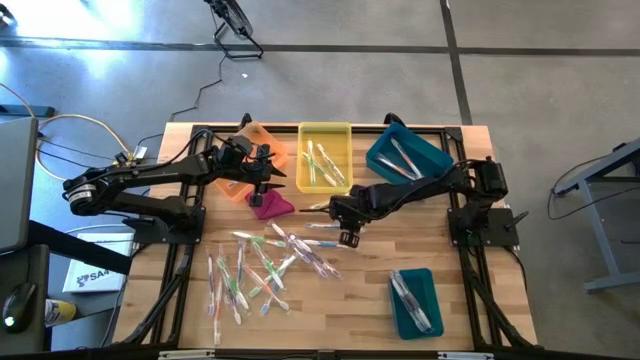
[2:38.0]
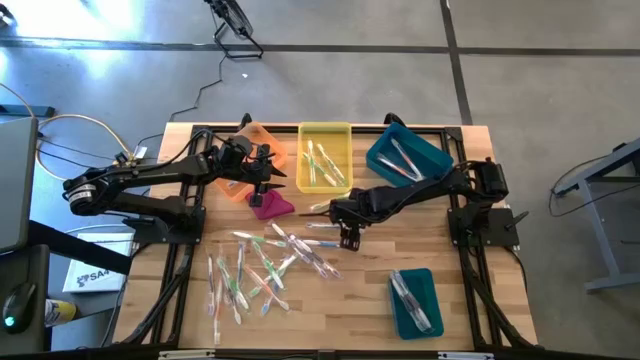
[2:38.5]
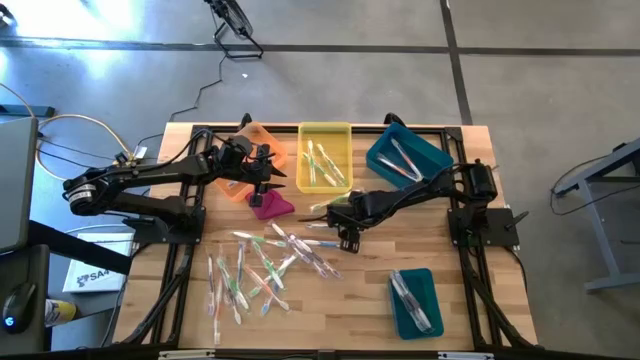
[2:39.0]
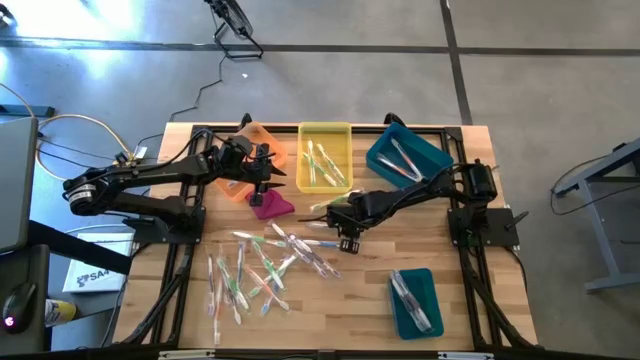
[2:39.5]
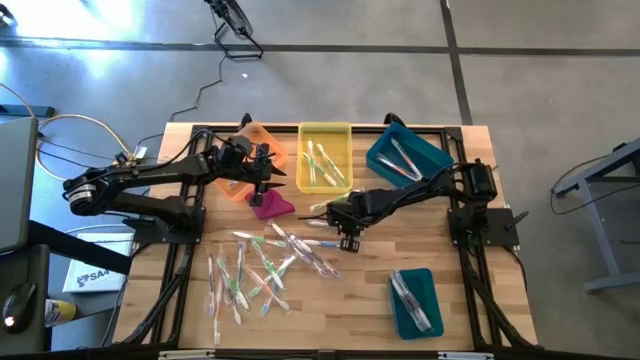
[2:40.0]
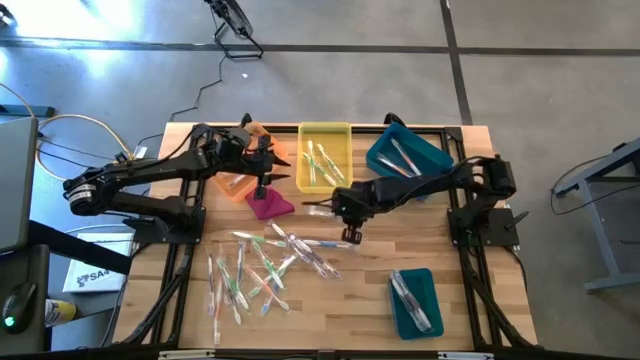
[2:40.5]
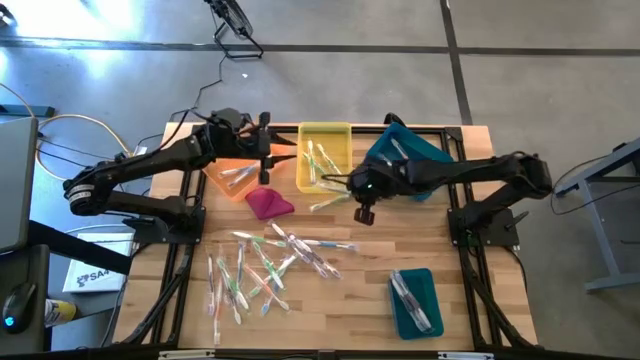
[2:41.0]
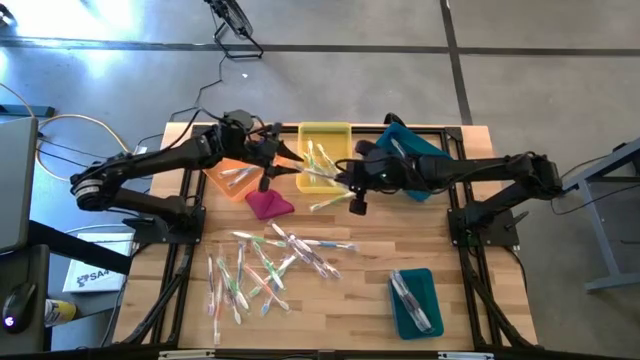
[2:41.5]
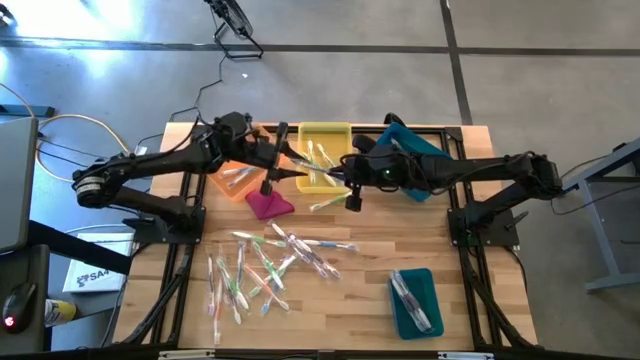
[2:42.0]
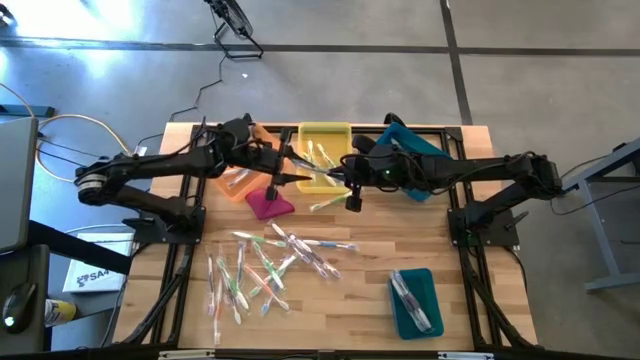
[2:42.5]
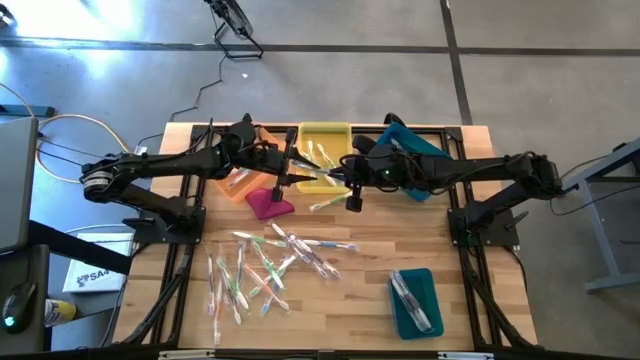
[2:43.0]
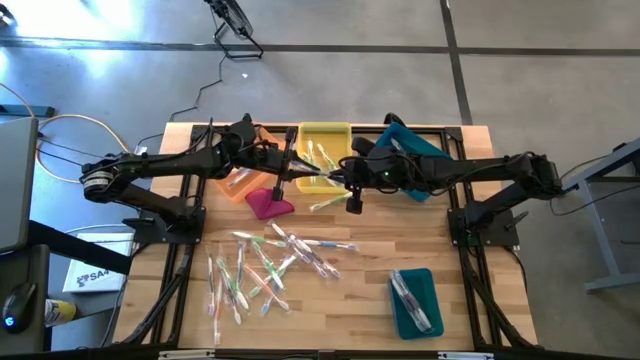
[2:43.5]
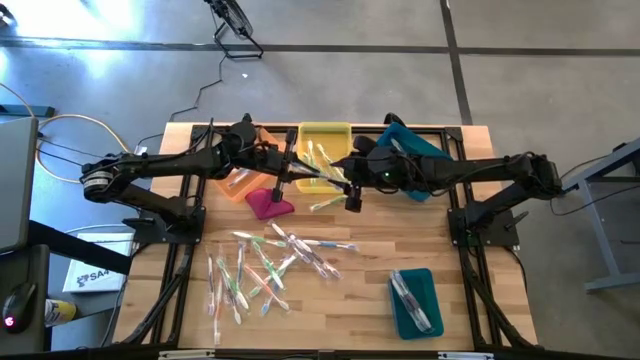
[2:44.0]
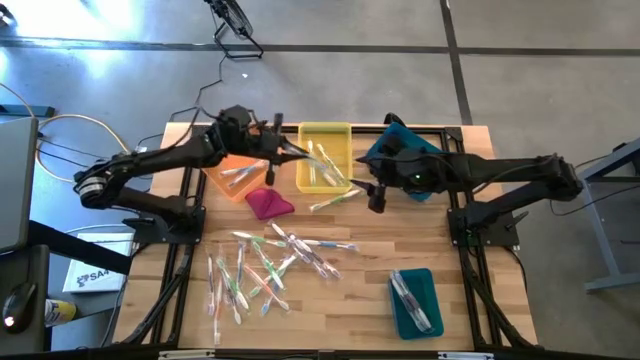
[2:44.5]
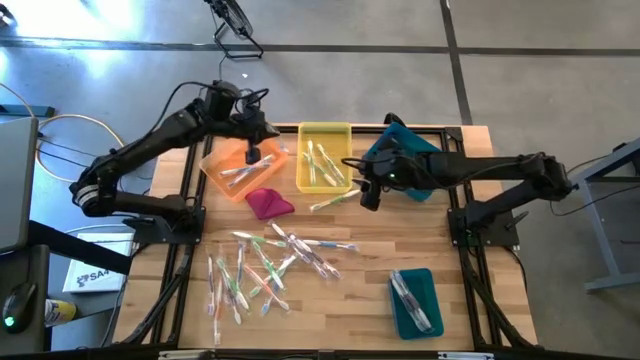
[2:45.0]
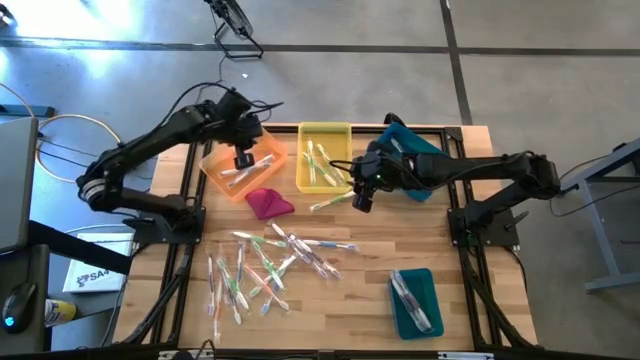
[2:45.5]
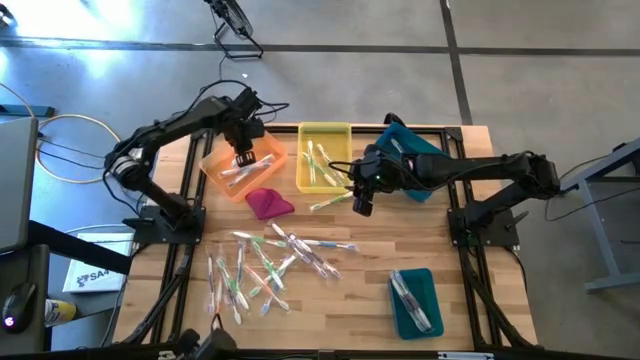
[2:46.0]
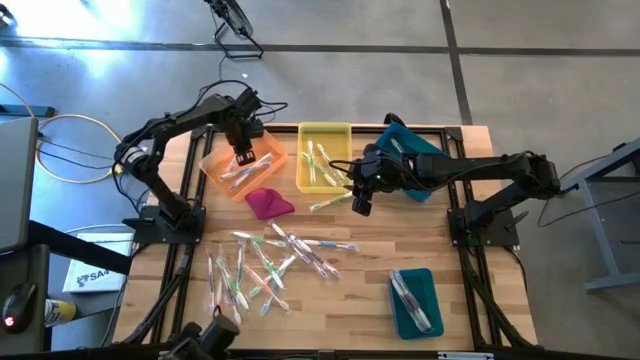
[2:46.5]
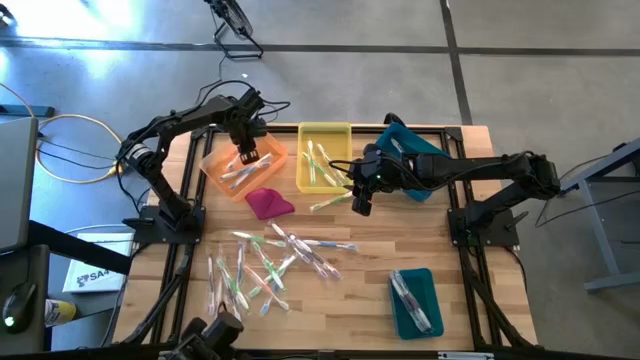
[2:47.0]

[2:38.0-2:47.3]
Task: Pick & Place Toothbrushes
Put the blue toothbrush into the orange bin

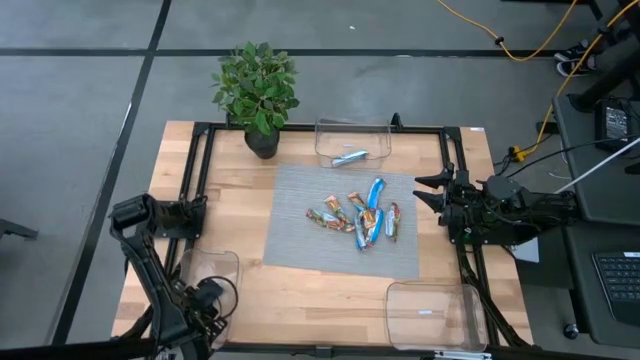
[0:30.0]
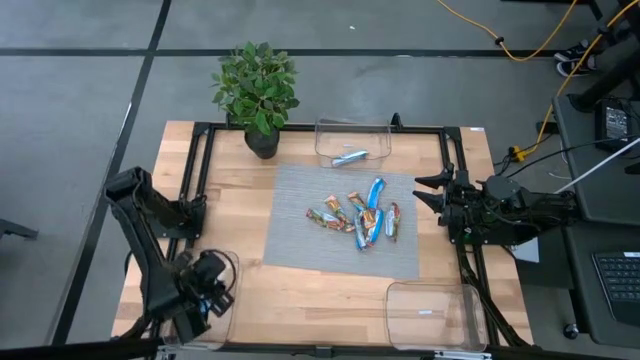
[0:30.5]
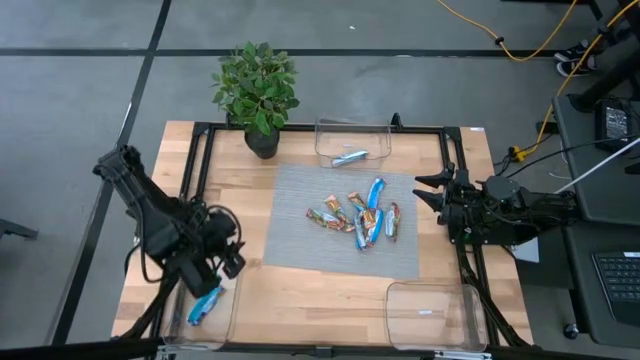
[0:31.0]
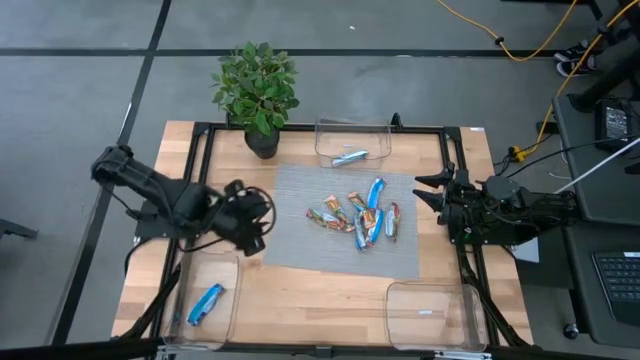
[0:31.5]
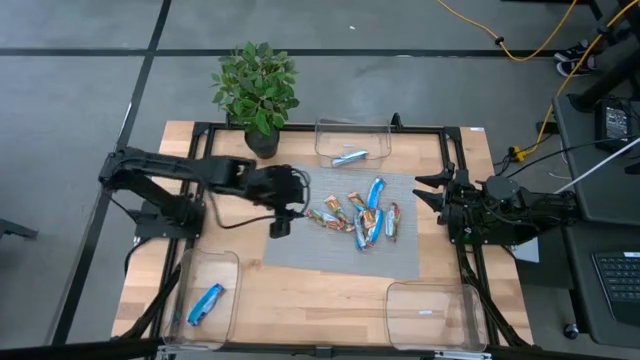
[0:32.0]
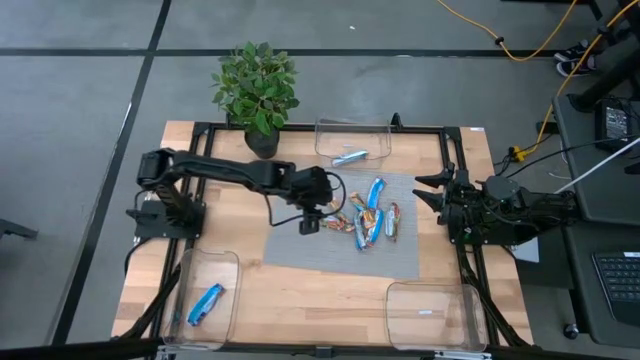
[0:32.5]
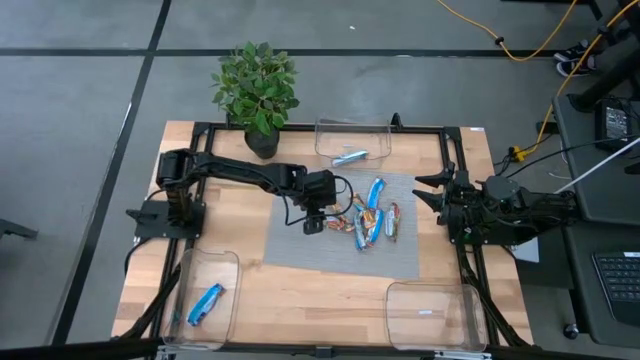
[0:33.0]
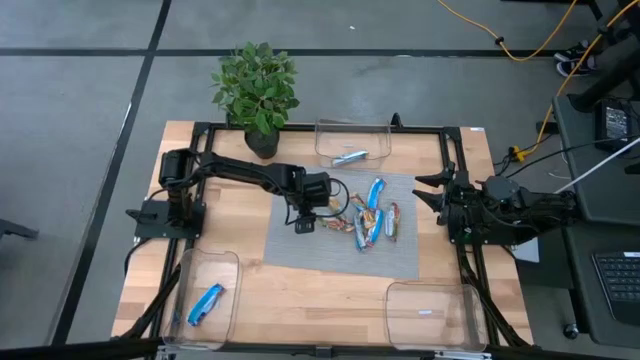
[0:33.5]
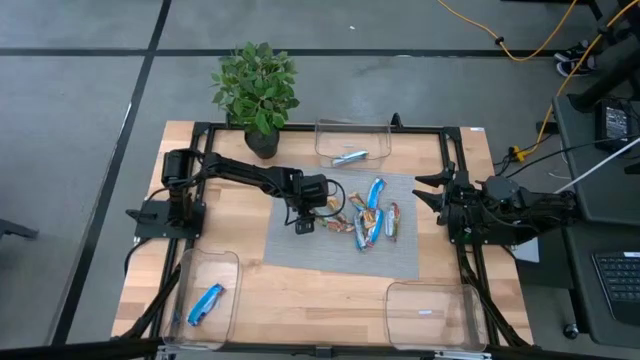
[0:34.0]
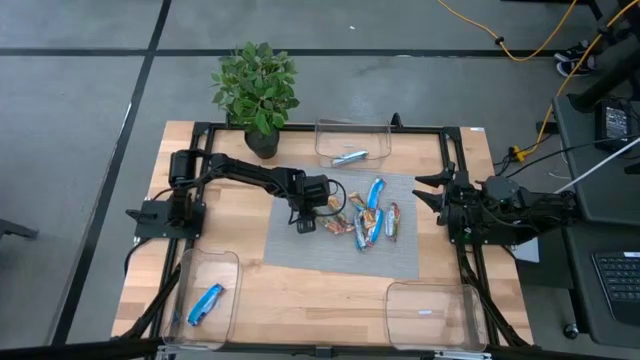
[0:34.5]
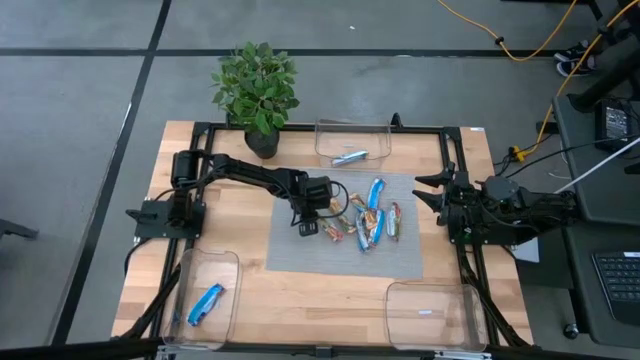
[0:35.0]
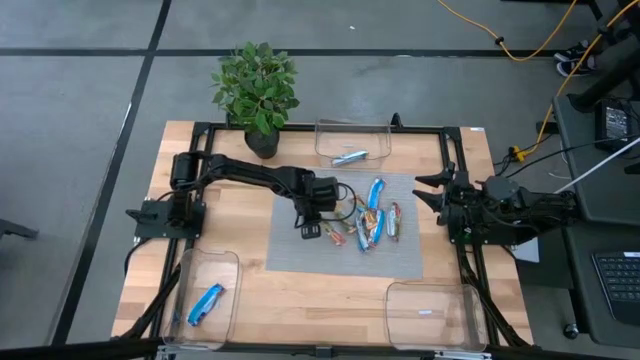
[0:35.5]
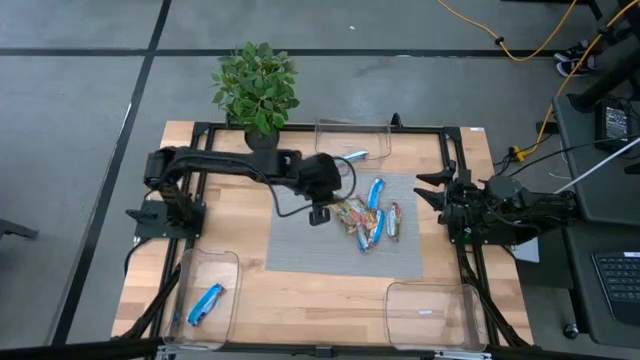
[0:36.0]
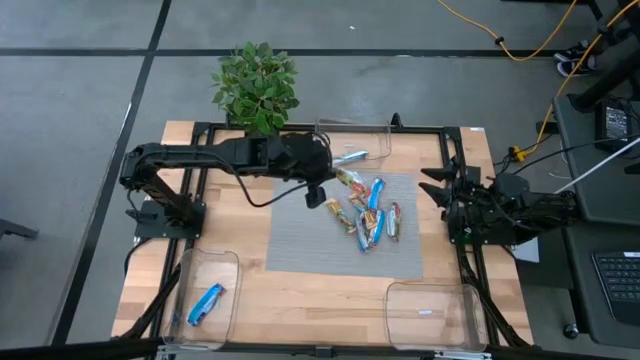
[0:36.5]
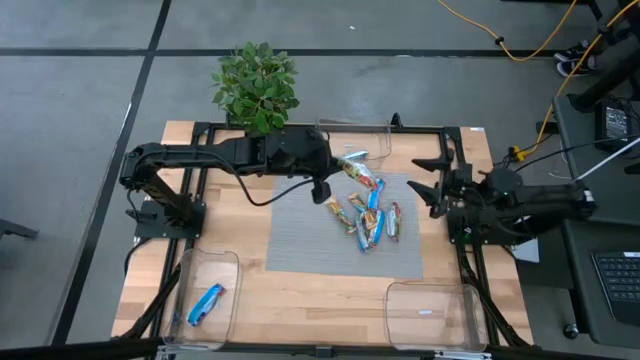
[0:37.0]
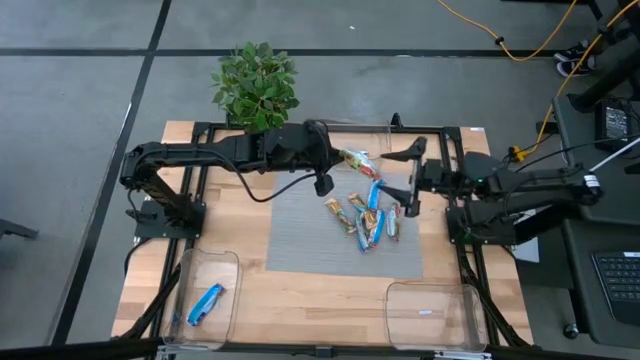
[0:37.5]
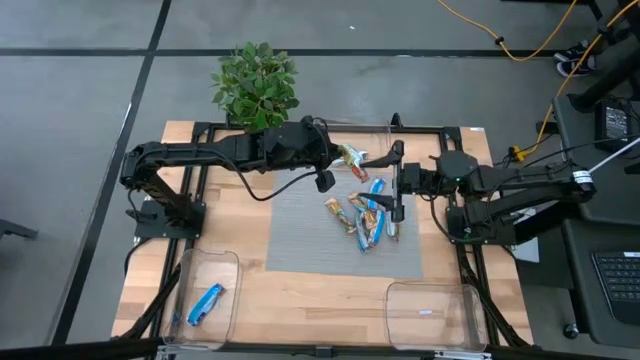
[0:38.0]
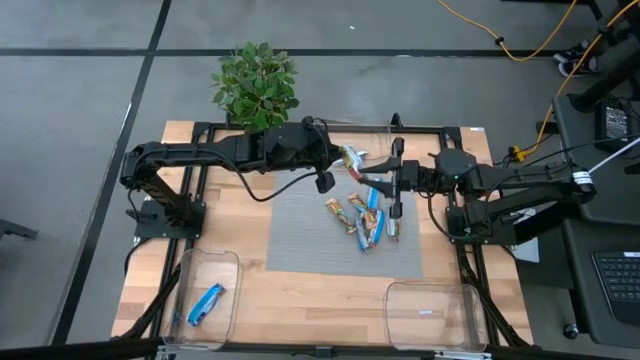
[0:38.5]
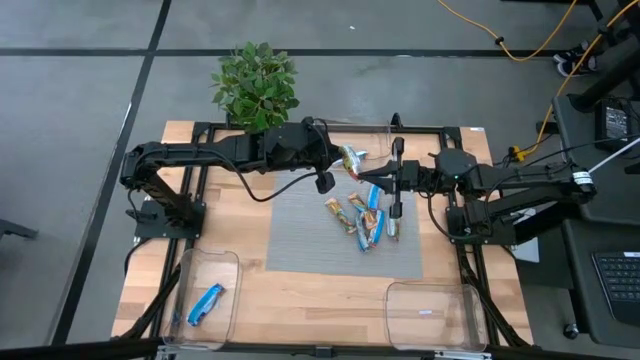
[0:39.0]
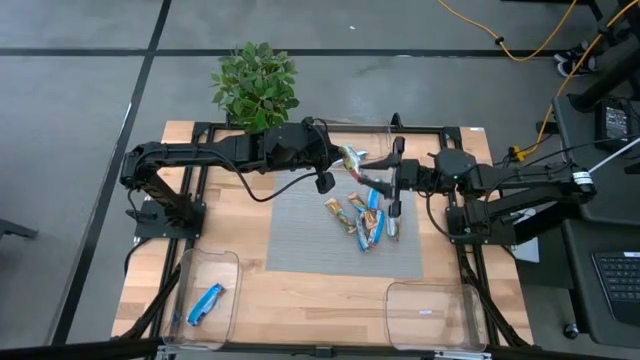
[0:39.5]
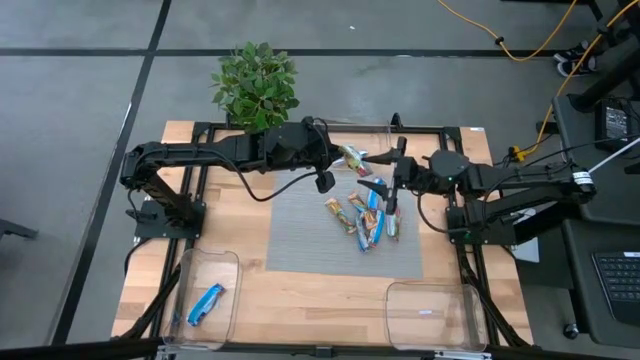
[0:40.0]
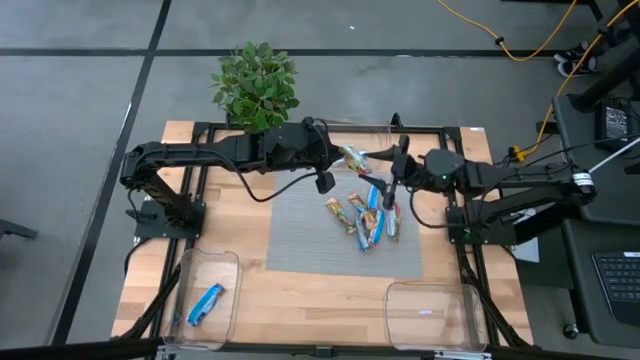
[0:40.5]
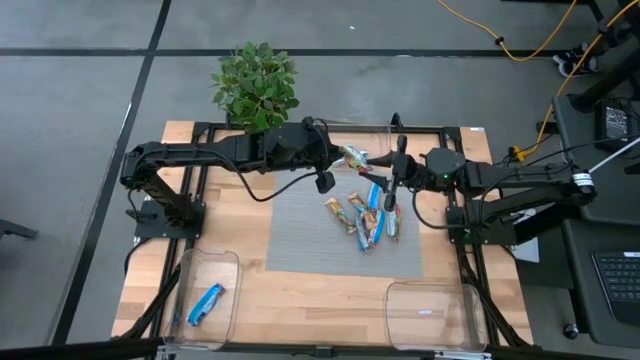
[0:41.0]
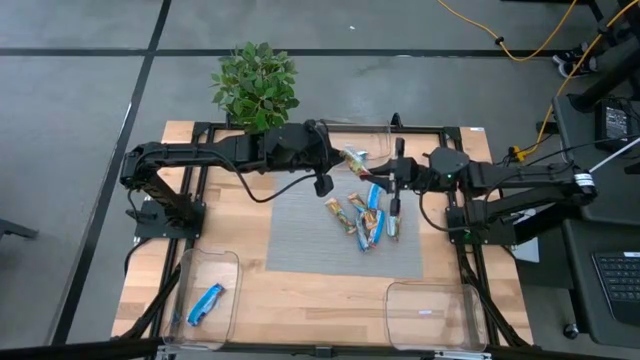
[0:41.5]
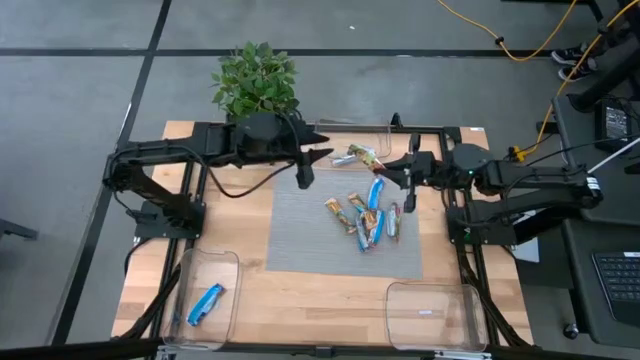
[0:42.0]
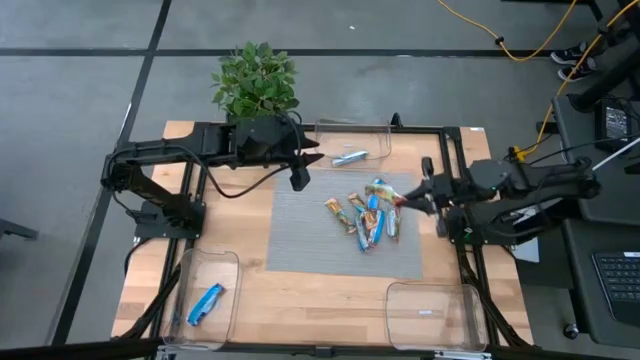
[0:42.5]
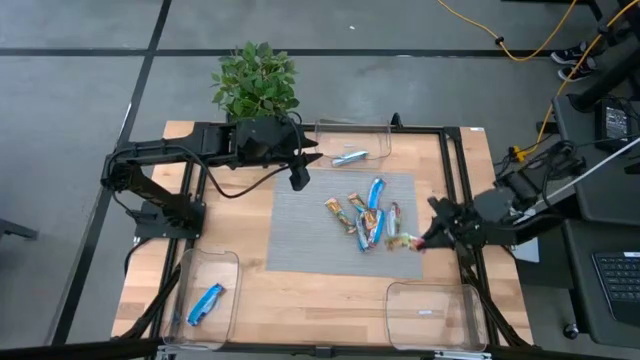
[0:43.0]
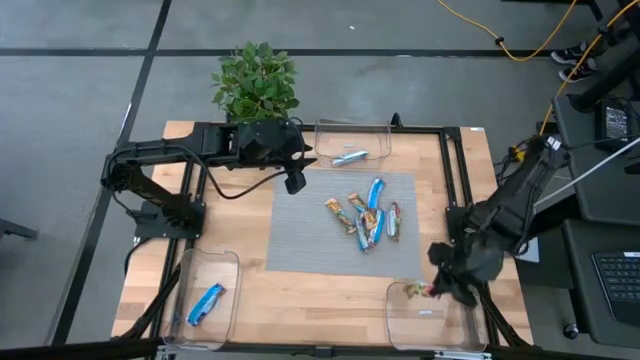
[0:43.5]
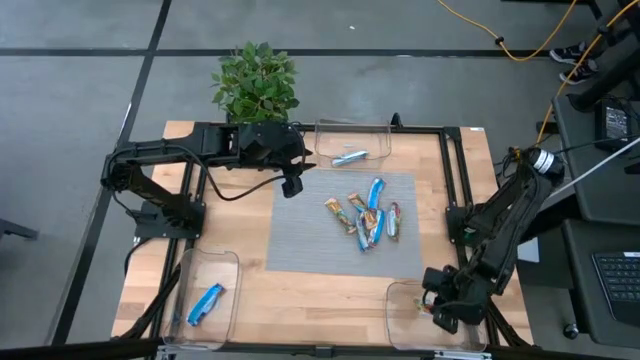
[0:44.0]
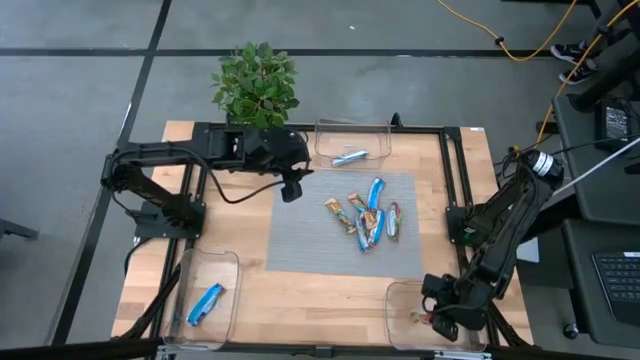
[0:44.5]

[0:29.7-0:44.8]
Task: Pick and place Granola Bars by type
Put the red granola bar into the bottom right transparent bin
